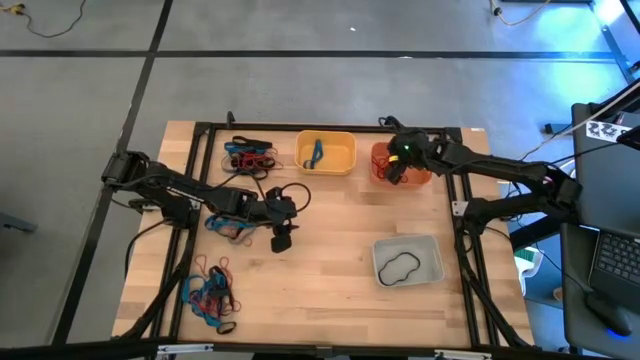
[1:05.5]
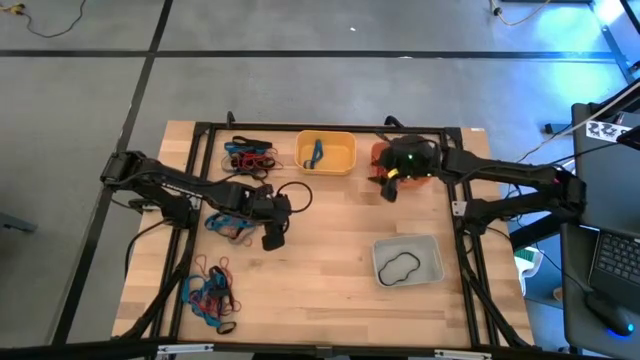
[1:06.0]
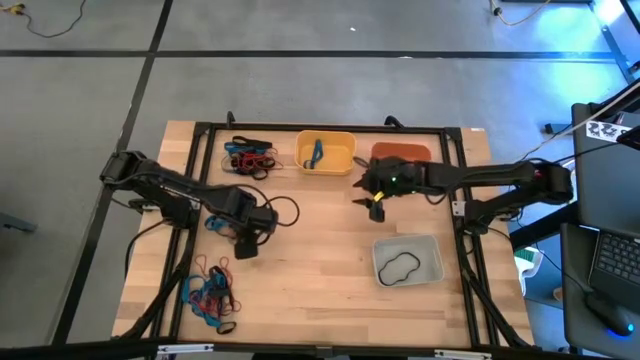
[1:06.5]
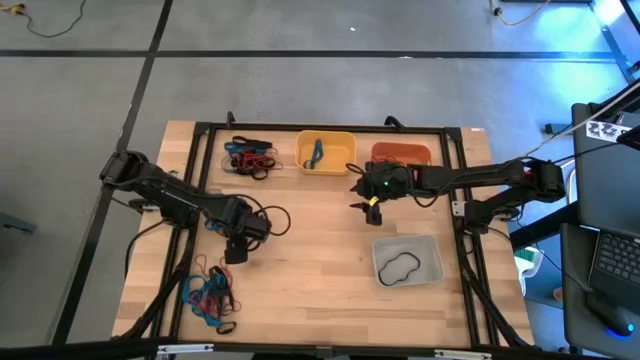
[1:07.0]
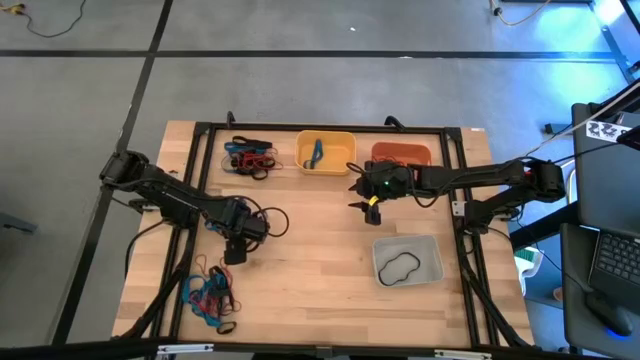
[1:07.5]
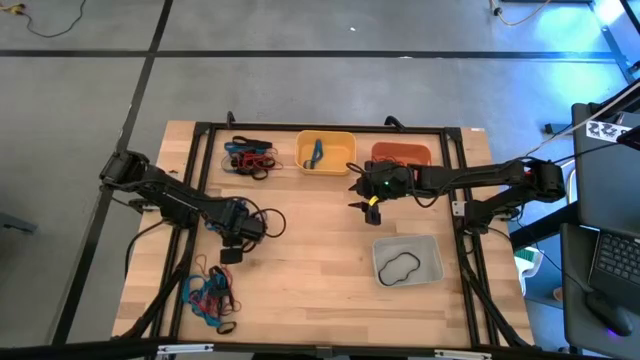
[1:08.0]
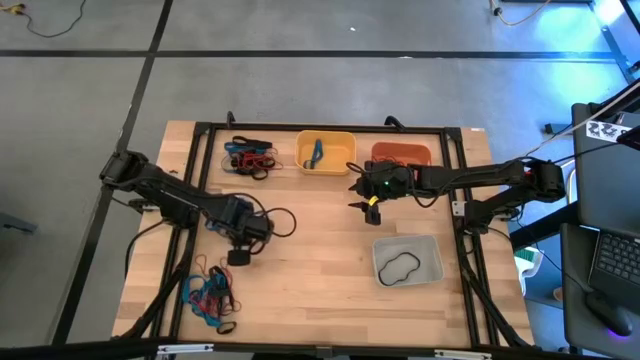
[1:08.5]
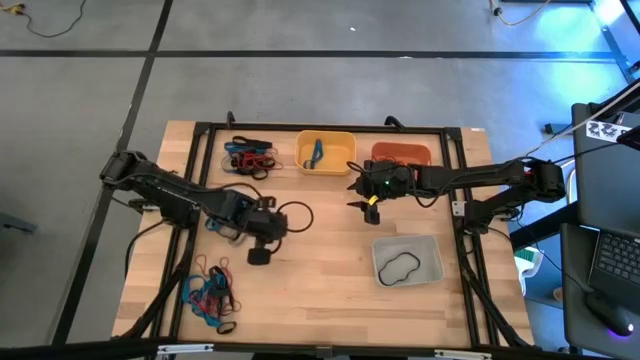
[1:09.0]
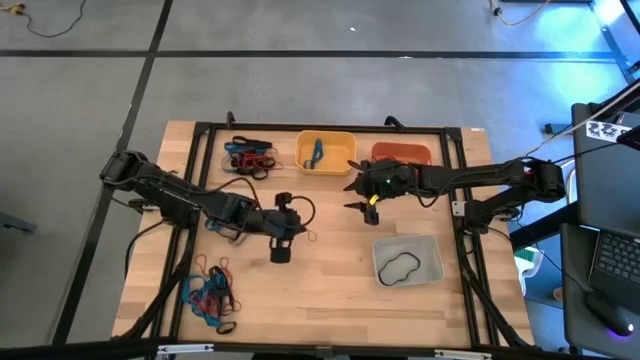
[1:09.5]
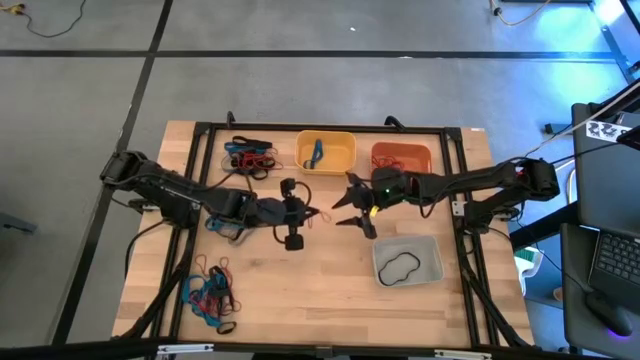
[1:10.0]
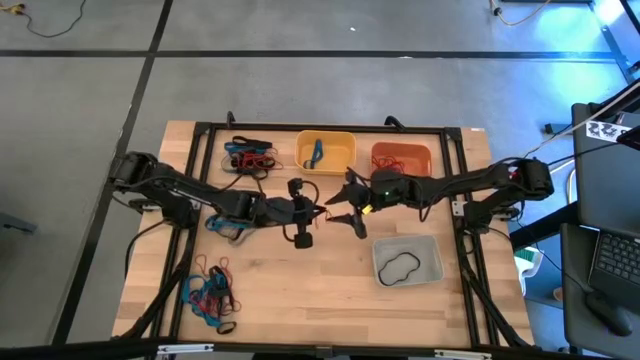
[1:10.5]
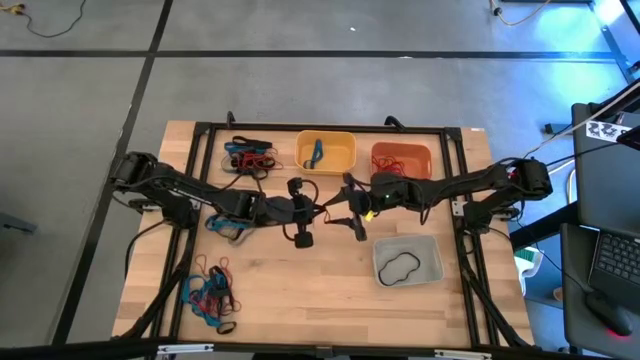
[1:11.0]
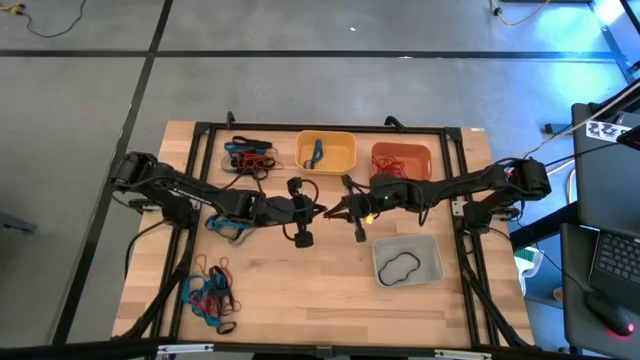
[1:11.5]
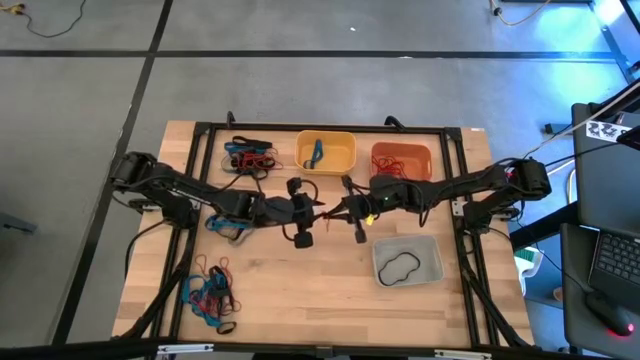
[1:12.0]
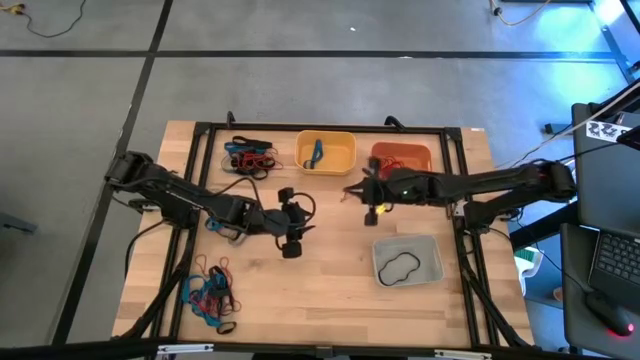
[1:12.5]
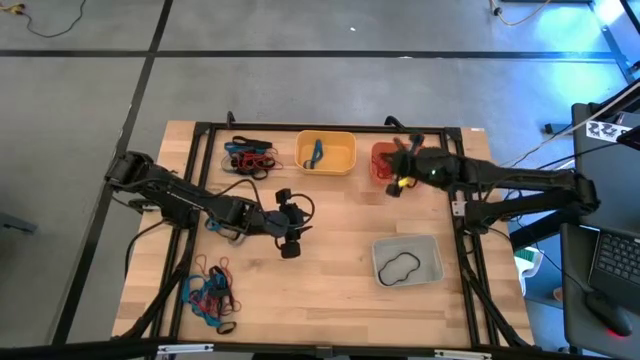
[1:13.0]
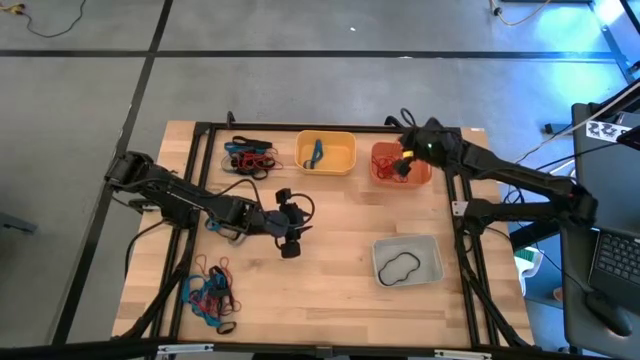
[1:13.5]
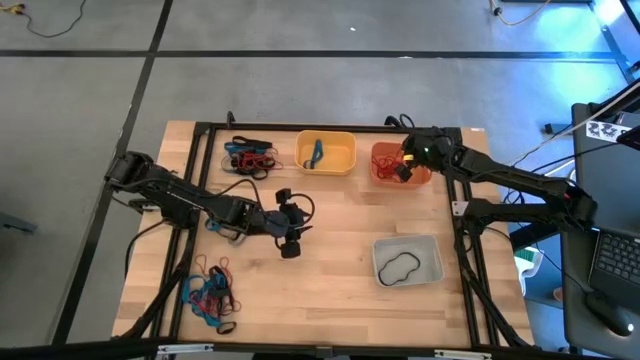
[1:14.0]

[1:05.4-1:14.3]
Task: Sort rubber bands into baskets
Put the red rubber band into the orange bin

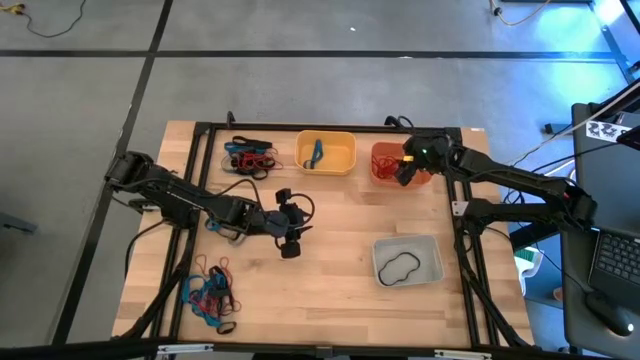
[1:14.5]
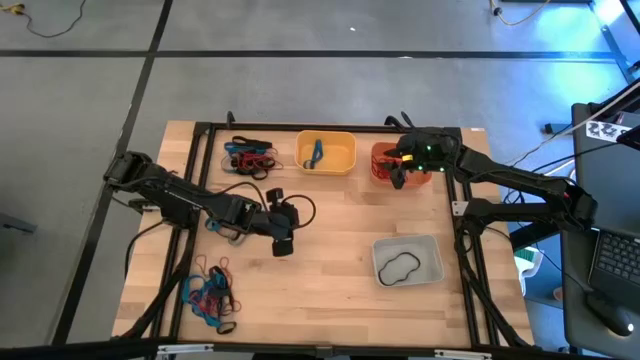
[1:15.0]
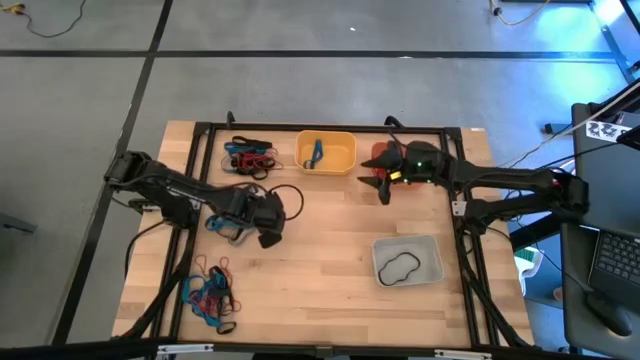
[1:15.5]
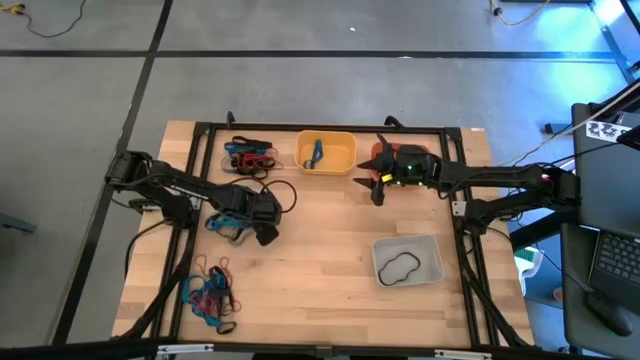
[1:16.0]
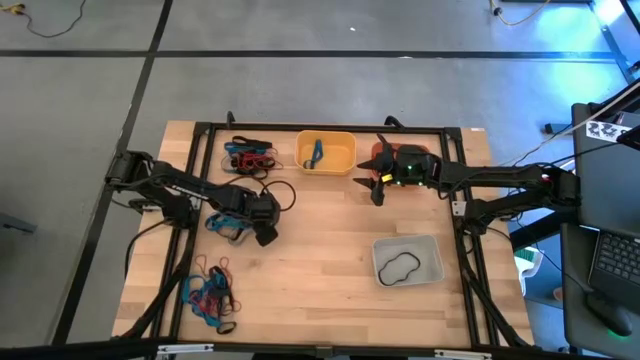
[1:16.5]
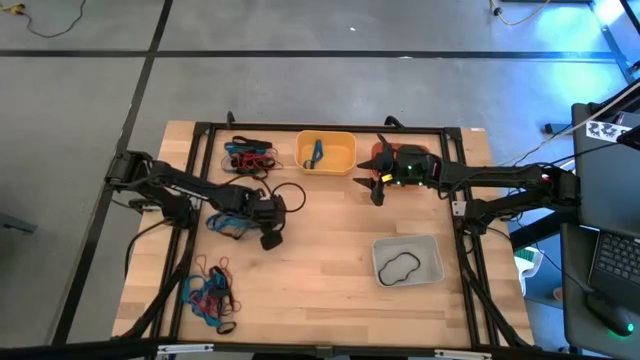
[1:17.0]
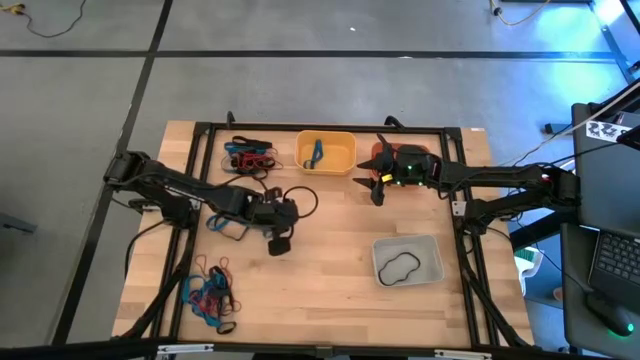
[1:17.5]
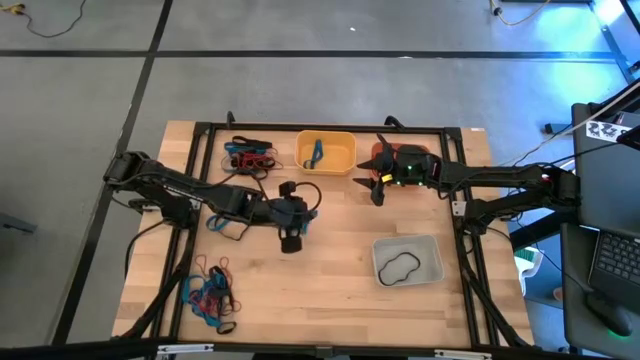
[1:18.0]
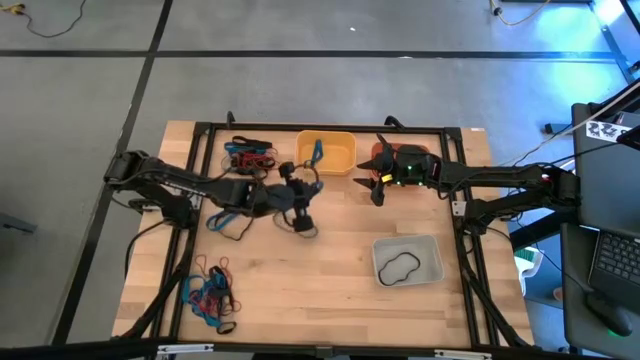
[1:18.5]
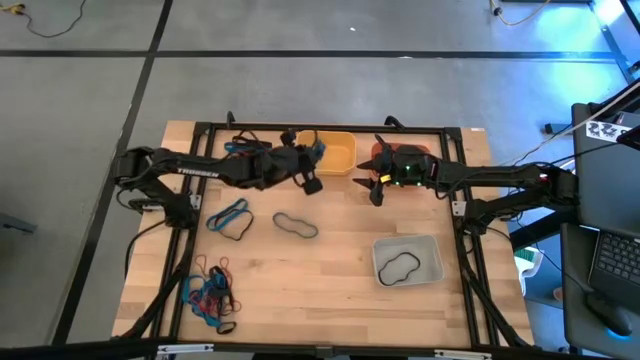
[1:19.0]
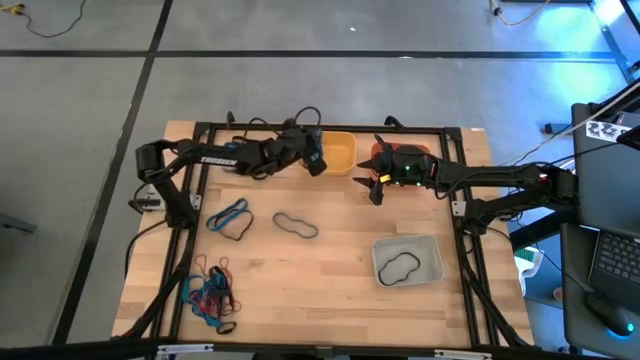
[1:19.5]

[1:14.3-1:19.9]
Put the blue rubber band into the yellow bin

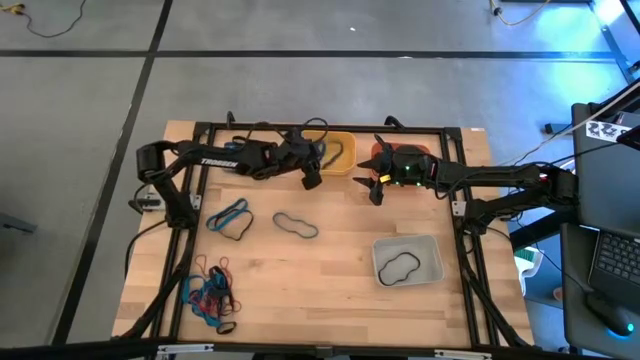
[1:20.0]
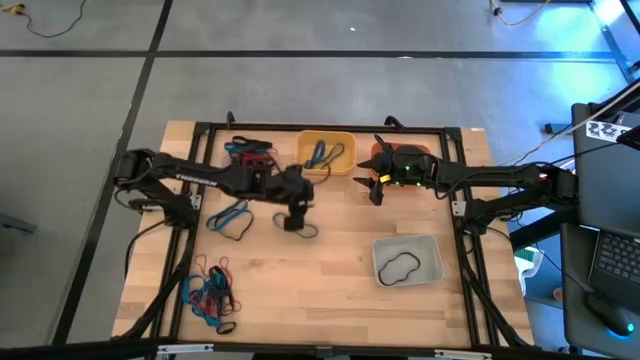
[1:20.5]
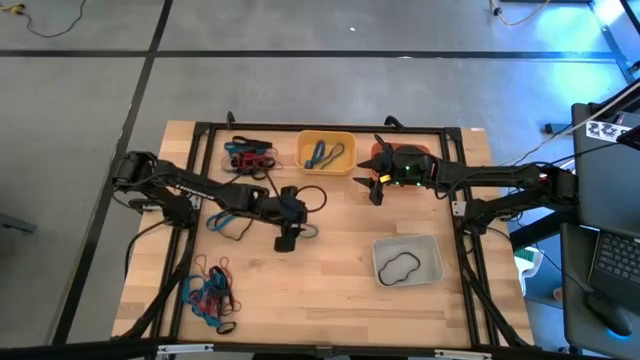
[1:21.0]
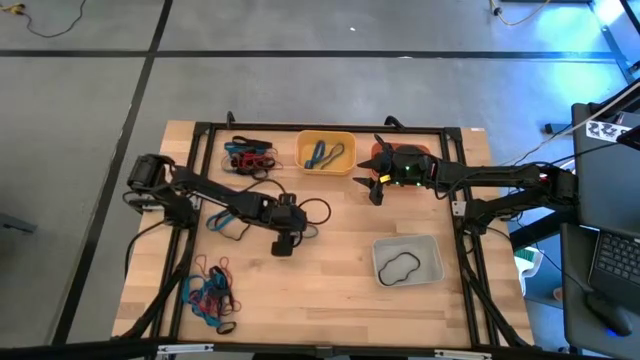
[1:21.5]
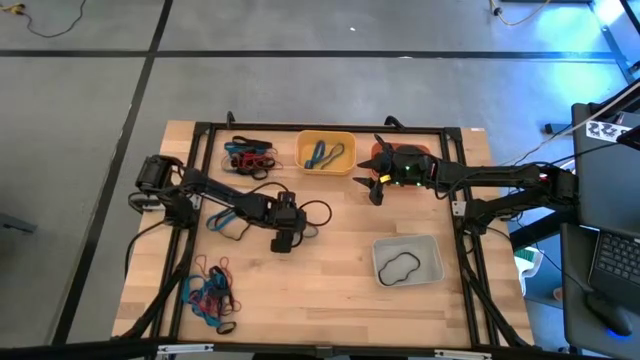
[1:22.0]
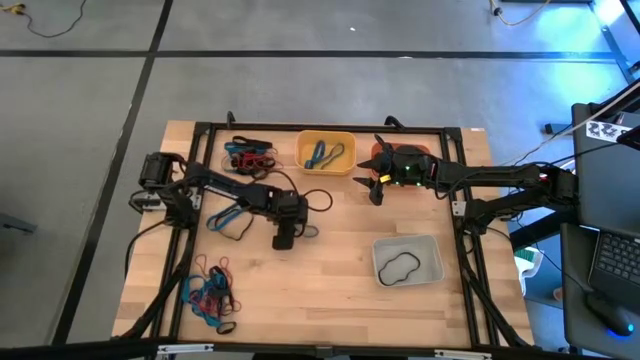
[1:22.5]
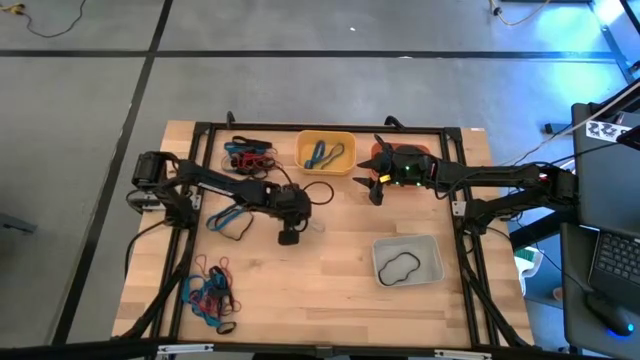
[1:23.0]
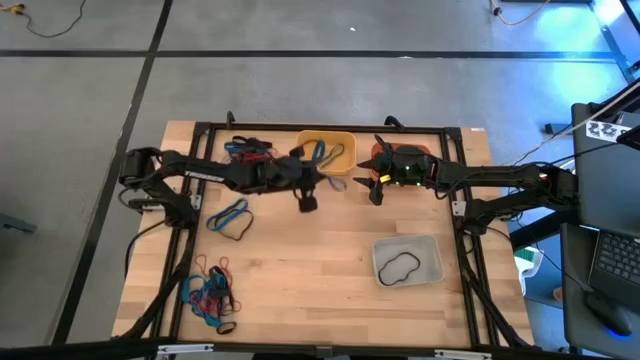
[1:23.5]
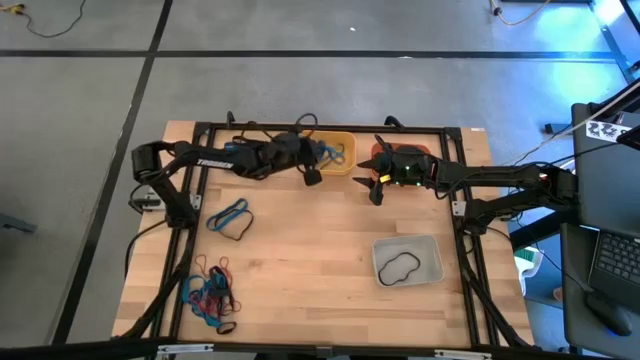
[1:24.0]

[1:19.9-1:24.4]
Put the blue rubber band into the yellow bin

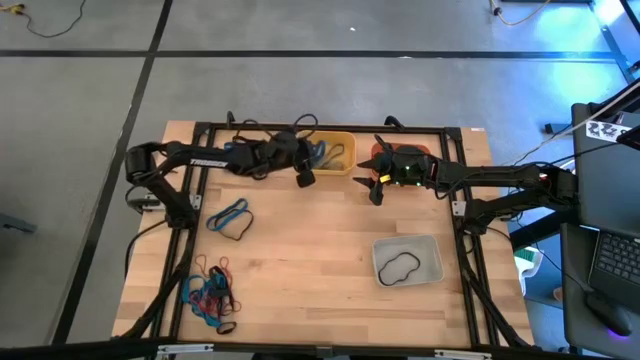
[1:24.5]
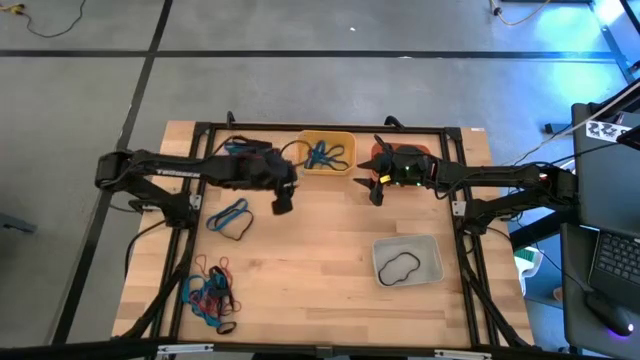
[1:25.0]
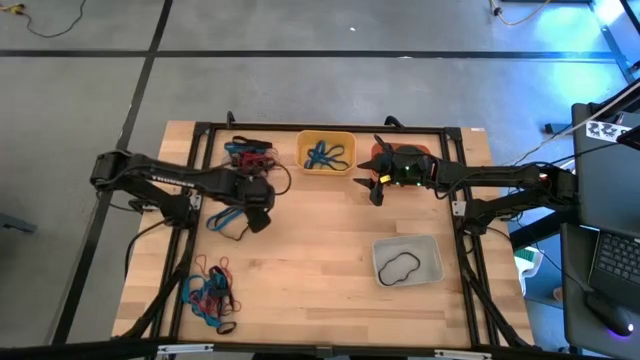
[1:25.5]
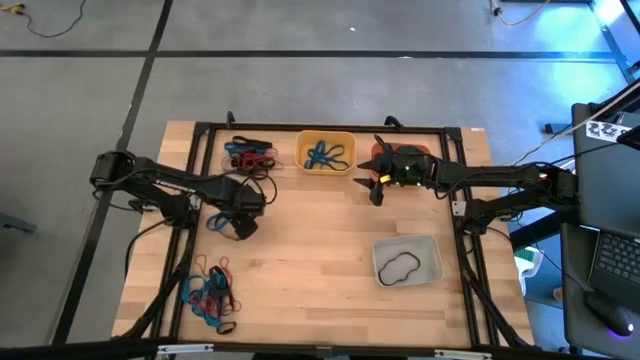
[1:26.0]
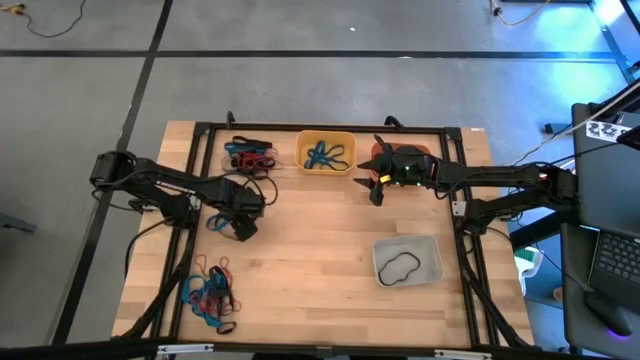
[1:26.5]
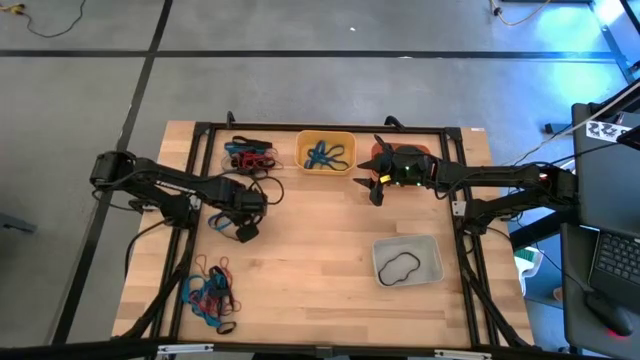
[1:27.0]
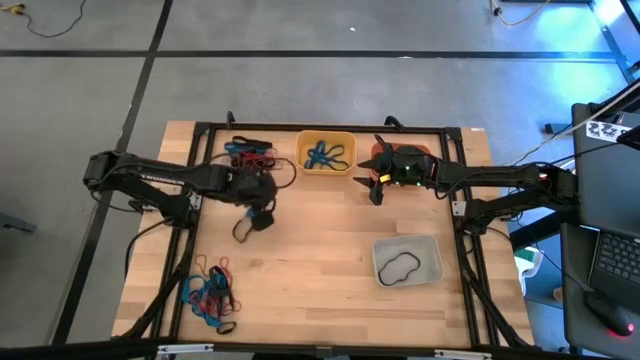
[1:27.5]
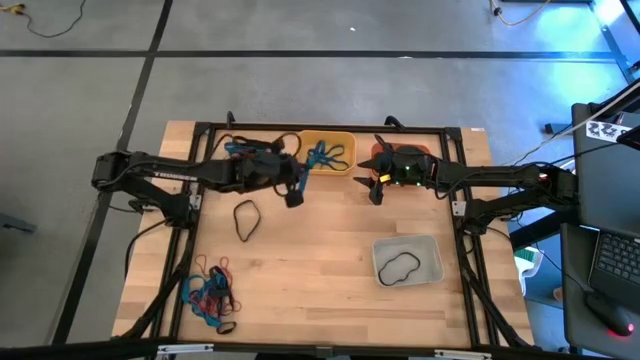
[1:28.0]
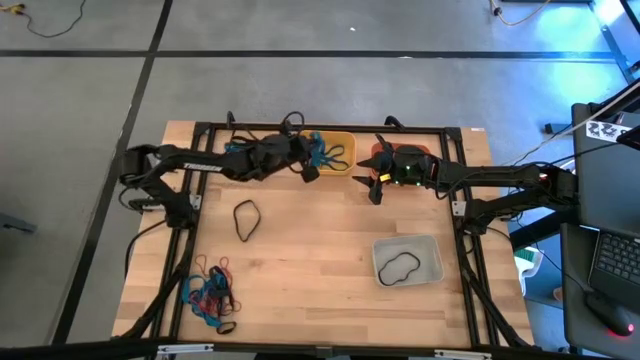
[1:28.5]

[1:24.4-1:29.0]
Put the blue rubber band into the yellow bin
